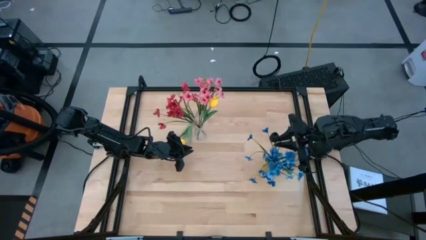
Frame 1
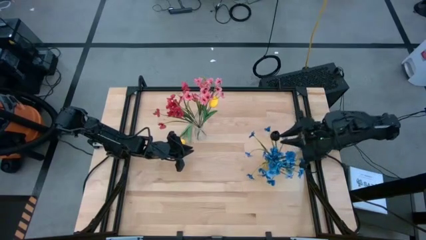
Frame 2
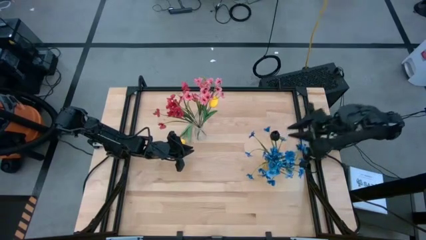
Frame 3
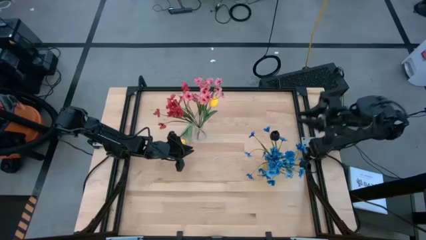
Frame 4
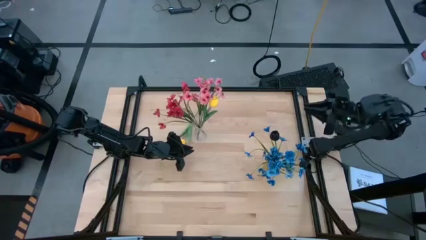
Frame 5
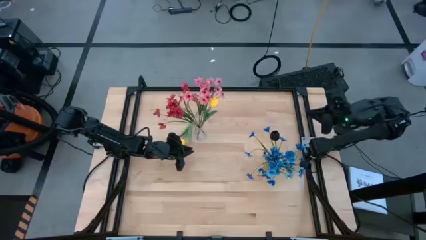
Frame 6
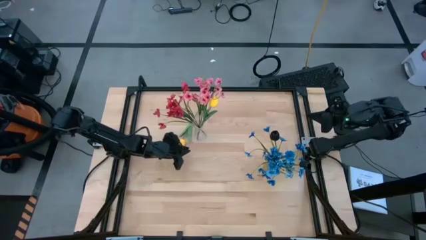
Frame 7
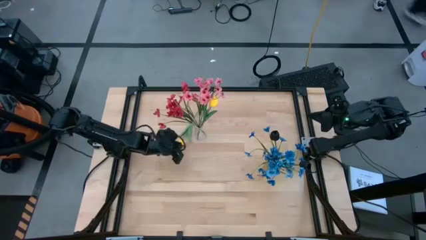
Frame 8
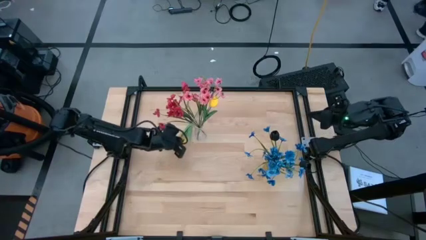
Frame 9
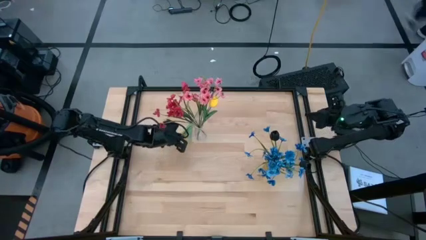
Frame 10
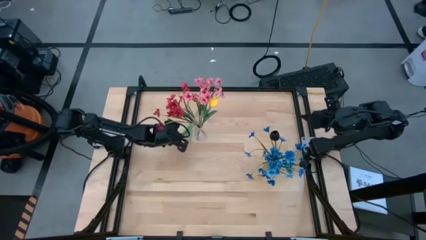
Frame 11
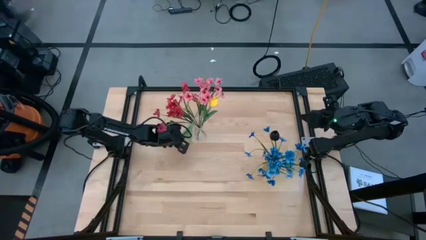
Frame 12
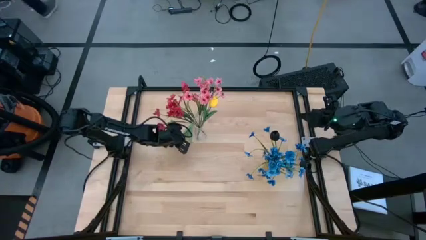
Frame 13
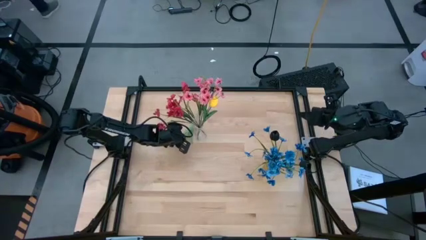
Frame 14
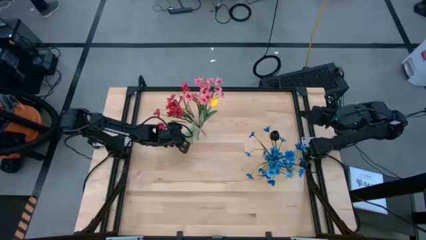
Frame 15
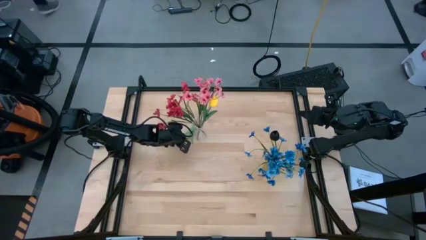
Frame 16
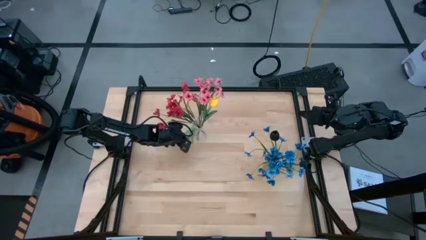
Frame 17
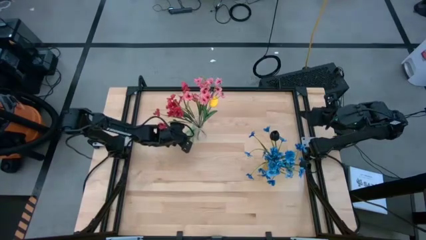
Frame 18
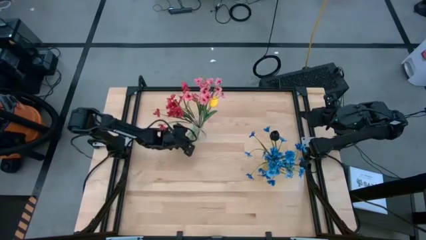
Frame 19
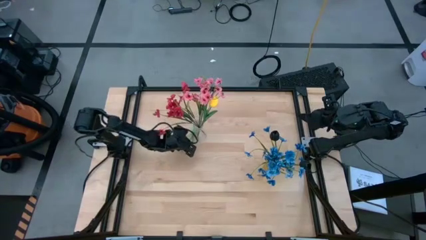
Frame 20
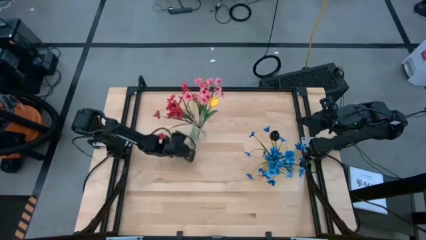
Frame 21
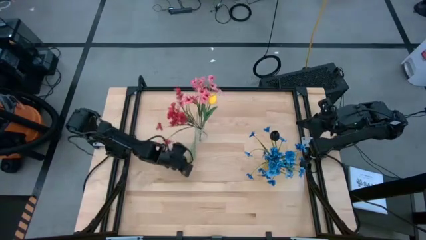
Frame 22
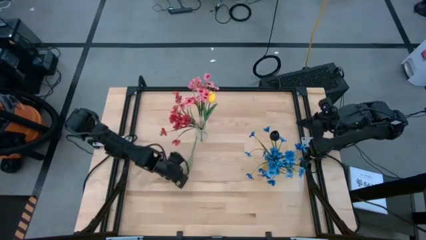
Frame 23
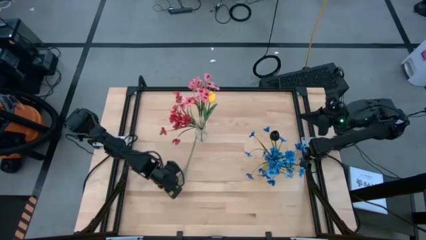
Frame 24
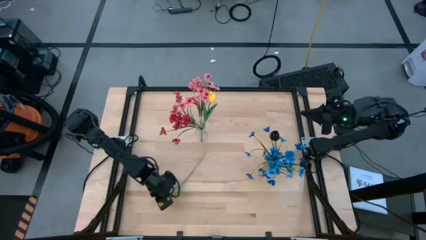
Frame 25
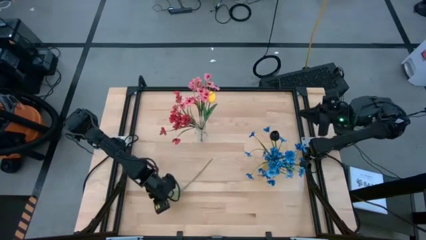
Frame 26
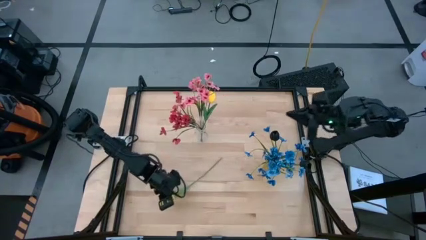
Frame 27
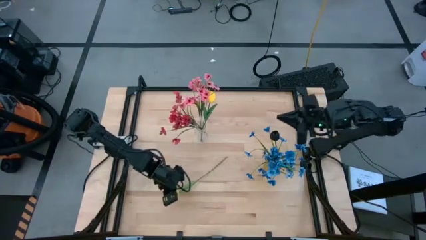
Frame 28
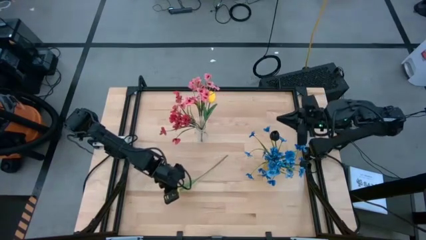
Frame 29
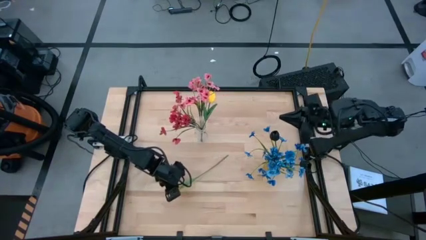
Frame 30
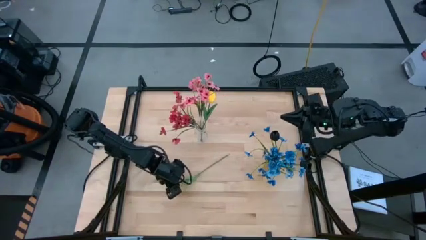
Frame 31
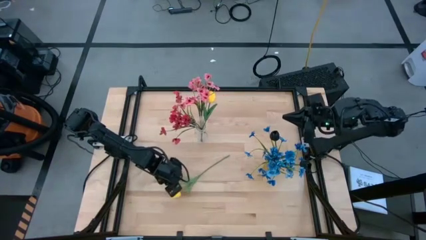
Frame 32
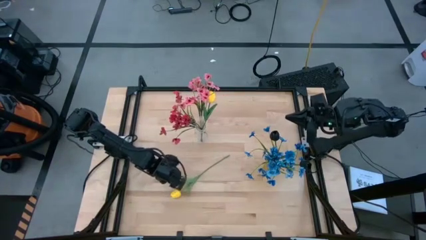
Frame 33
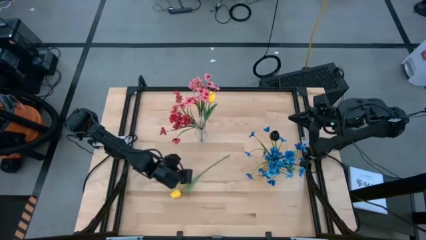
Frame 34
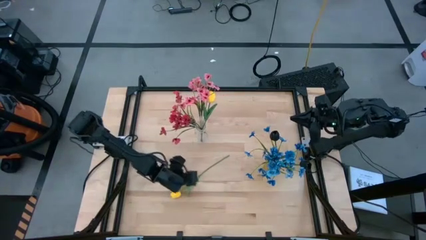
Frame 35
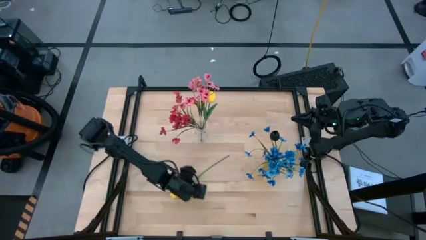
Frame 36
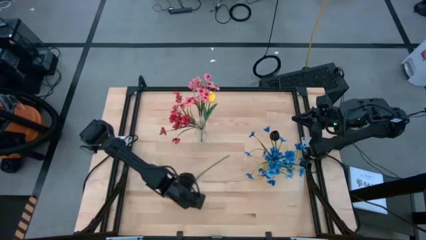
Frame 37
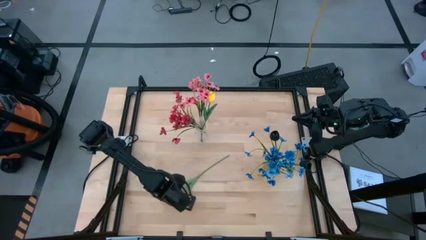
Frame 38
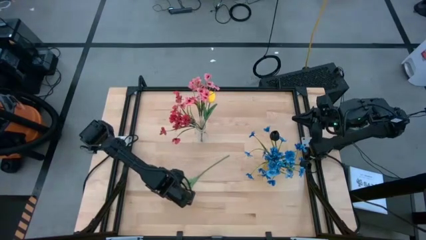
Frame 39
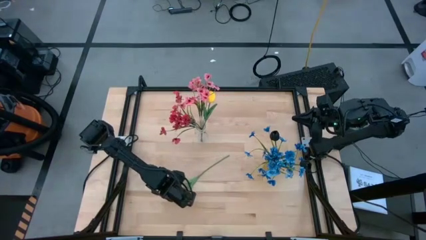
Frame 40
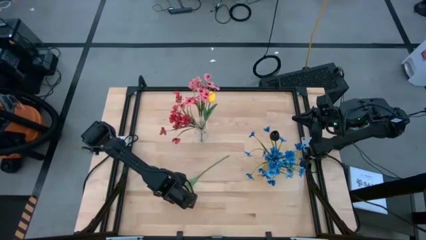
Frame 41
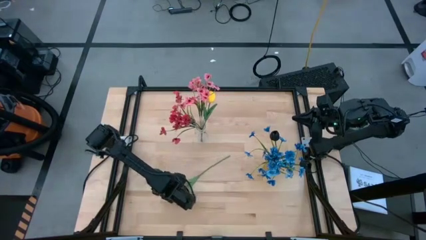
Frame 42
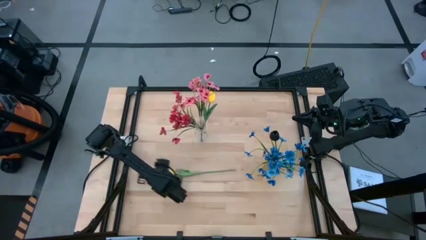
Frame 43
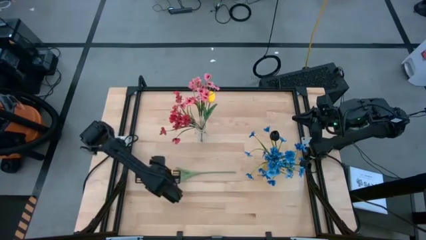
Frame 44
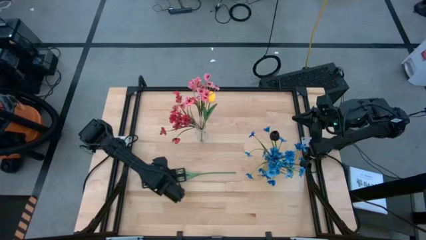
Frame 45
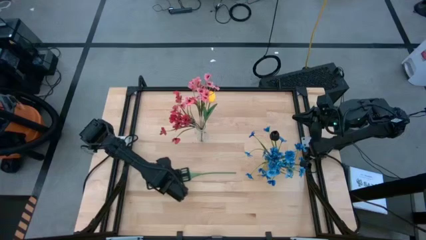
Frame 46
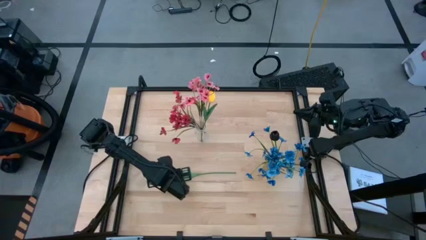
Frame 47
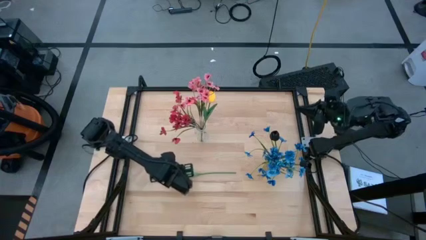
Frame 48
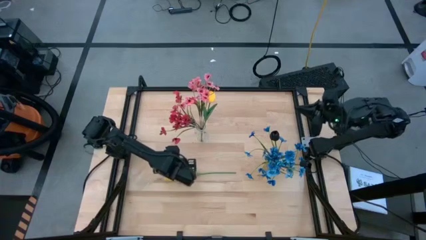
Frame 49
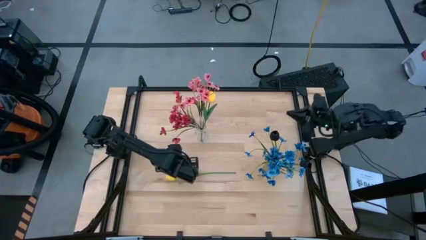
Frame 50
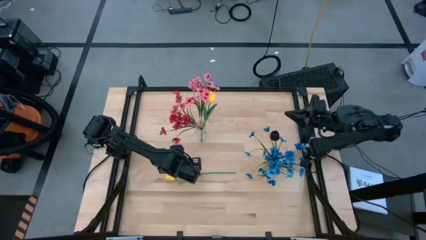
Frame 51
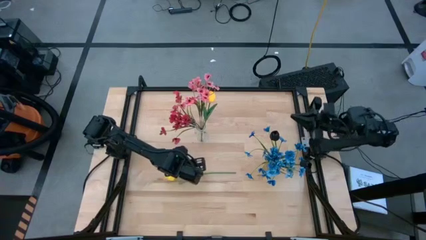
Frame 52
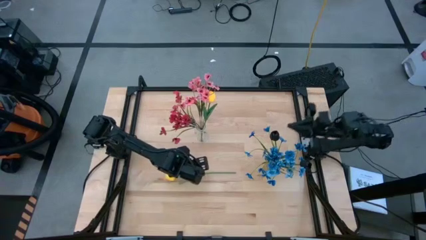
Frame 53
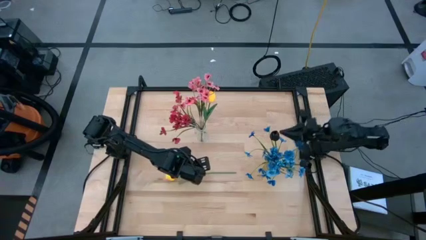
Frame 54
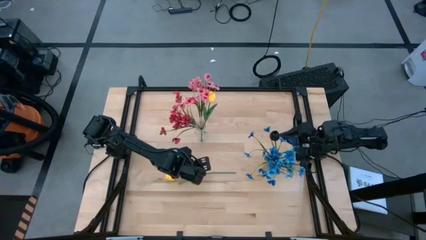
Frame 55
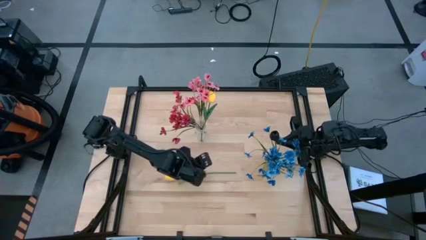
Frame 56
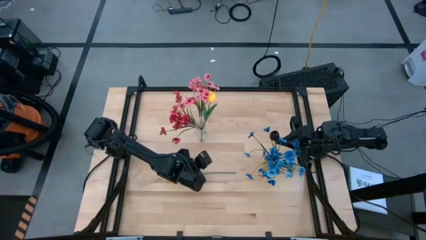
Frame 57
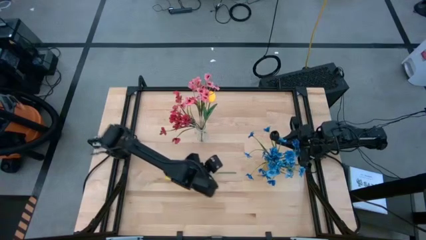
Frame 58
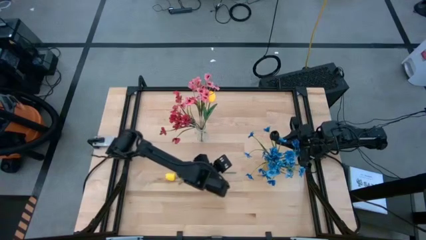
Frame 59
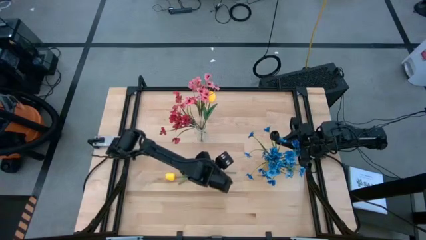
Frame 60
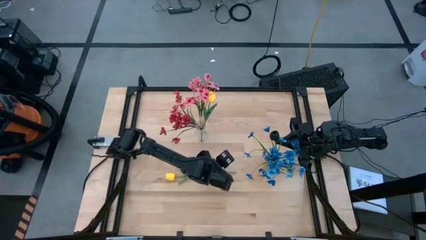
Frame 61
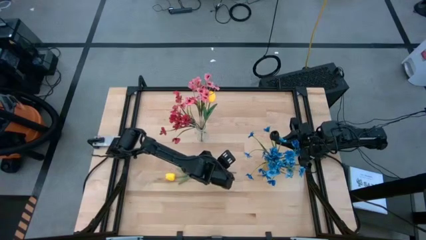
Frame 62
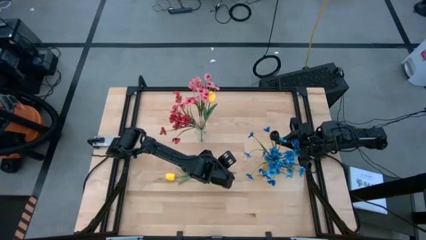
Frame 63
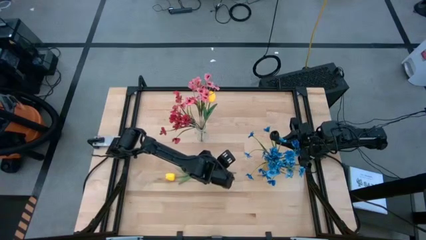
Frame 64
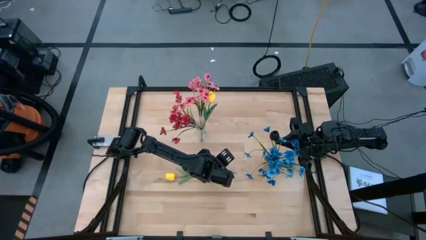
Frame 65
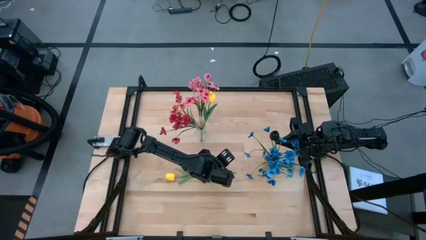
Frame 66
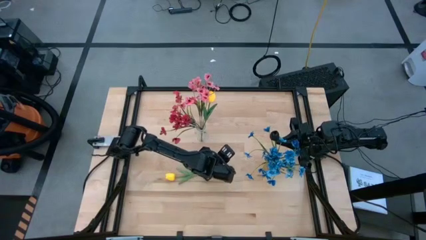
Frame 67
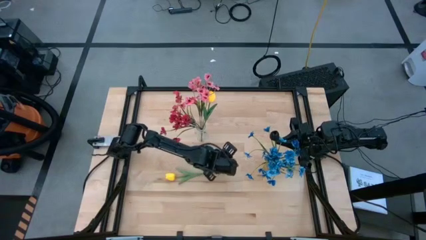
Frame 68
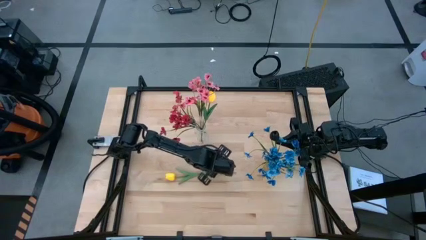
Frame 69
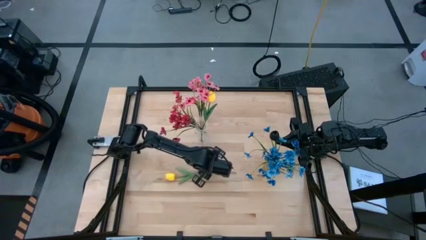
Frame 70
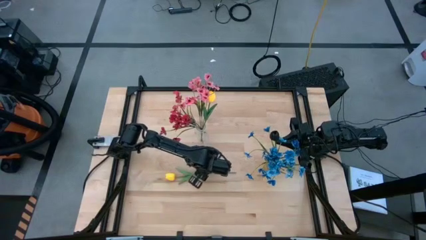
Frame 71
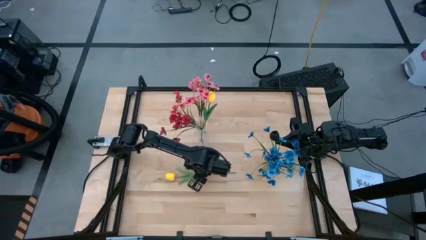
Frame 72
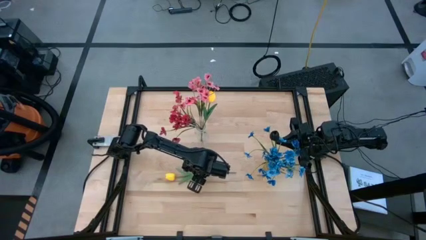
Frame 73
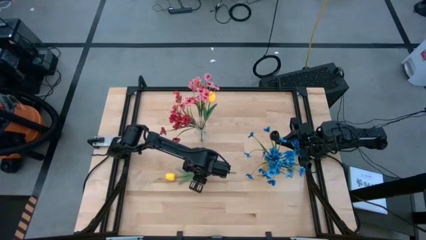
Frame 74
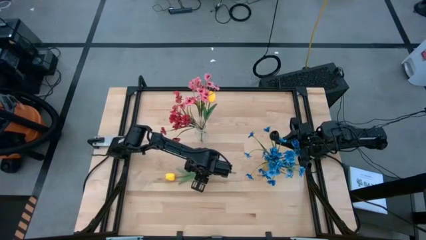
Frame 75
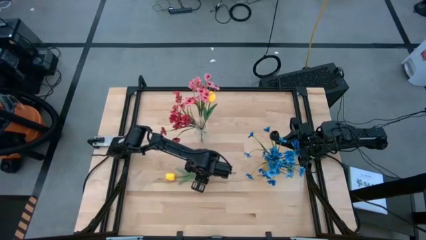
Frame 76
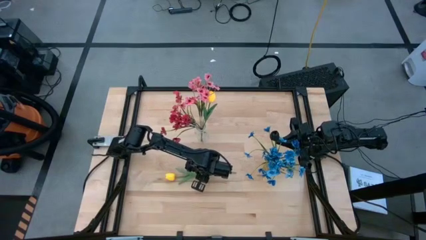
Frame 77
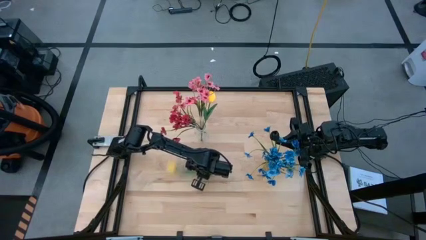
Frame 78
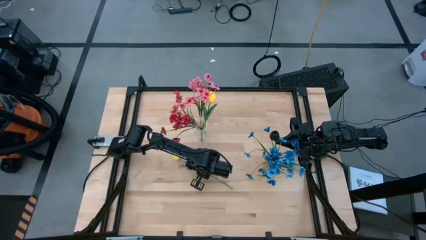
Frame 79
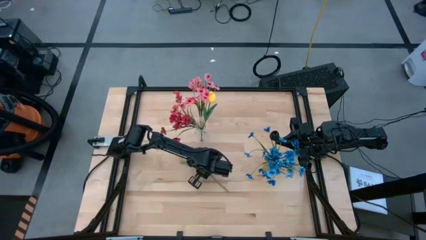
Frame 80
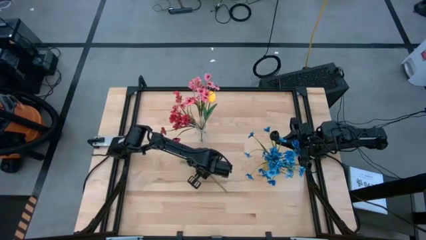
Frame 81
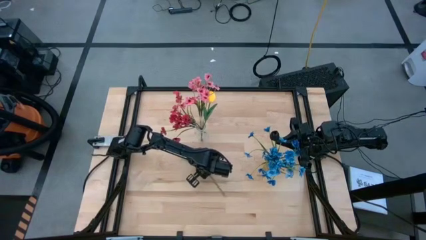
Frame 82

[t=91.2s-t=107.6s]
Task: Sort flowers into vase by color
Put the yellow flower into the transparent vase
